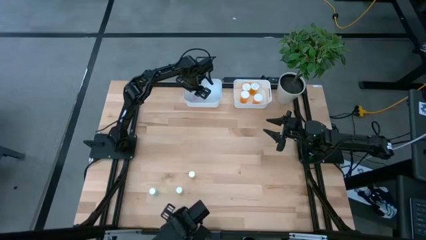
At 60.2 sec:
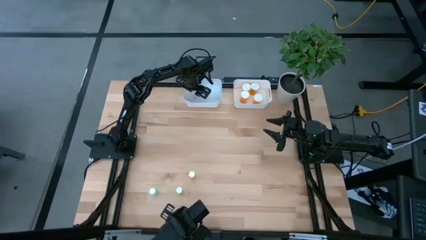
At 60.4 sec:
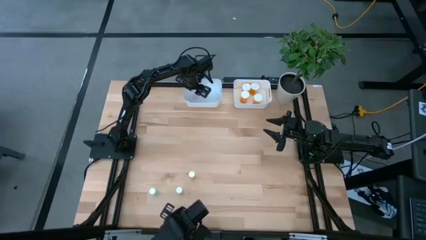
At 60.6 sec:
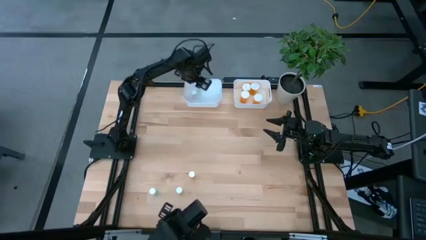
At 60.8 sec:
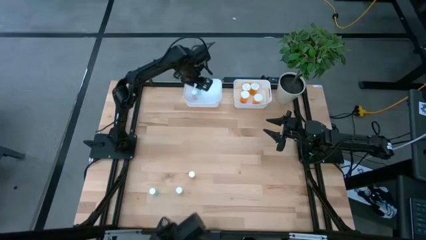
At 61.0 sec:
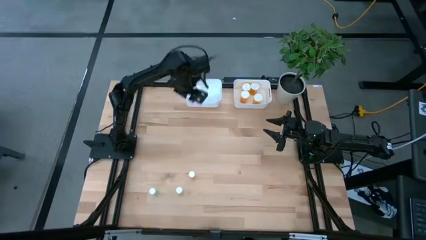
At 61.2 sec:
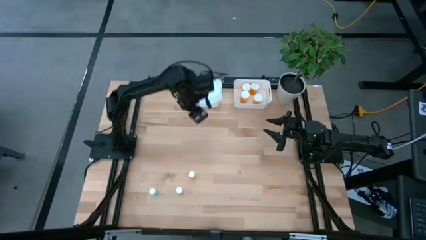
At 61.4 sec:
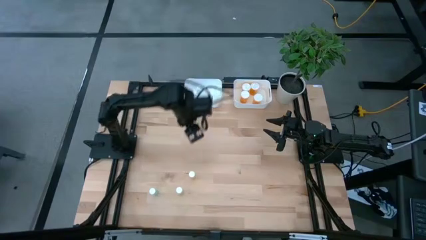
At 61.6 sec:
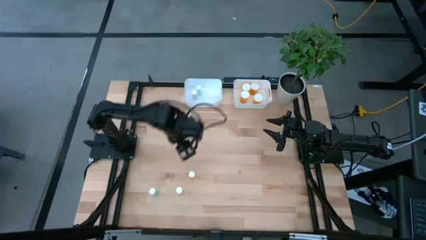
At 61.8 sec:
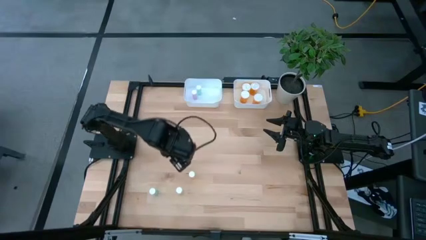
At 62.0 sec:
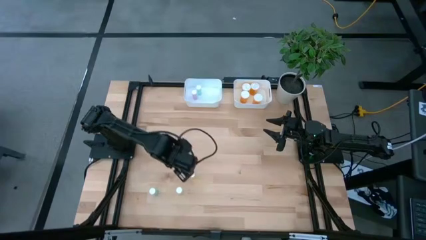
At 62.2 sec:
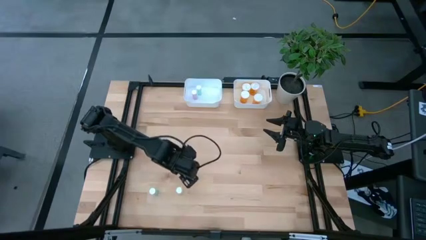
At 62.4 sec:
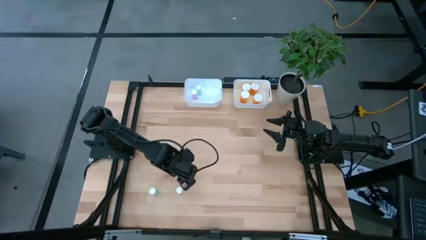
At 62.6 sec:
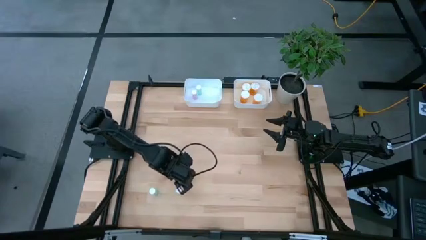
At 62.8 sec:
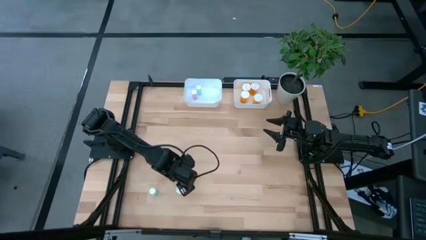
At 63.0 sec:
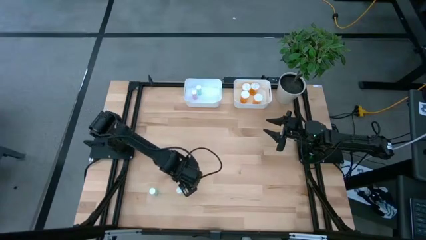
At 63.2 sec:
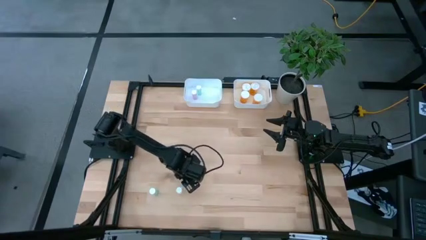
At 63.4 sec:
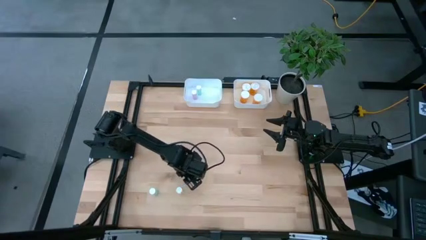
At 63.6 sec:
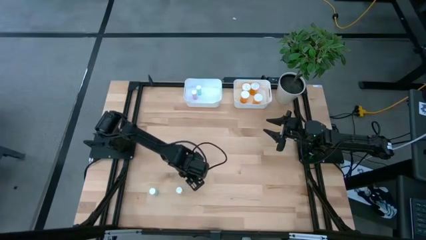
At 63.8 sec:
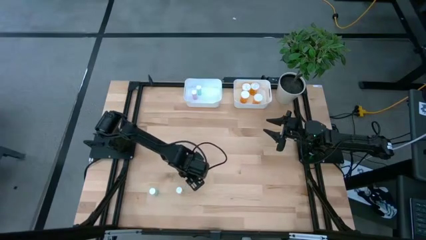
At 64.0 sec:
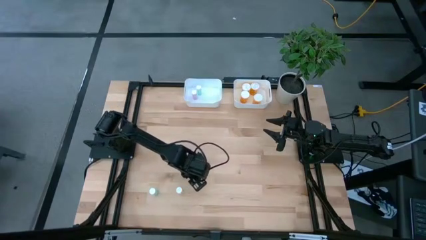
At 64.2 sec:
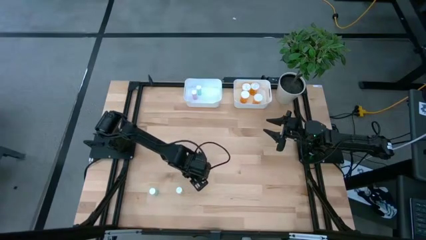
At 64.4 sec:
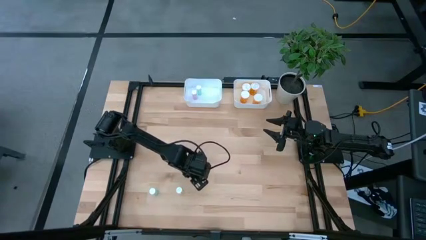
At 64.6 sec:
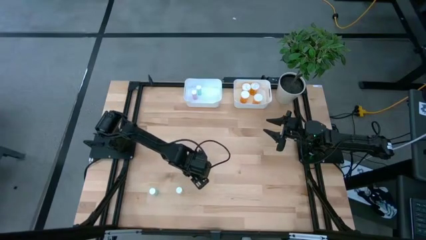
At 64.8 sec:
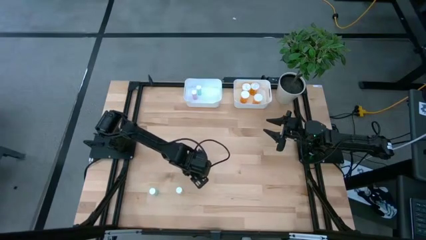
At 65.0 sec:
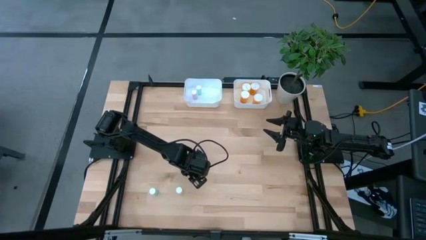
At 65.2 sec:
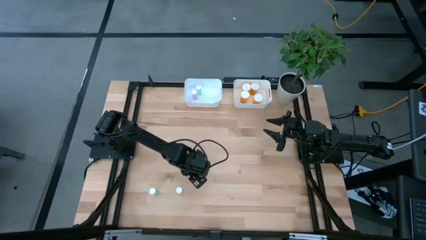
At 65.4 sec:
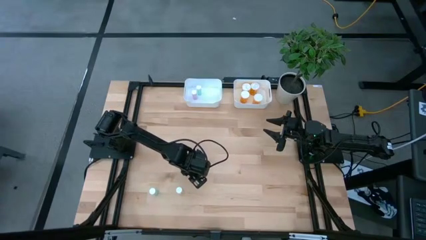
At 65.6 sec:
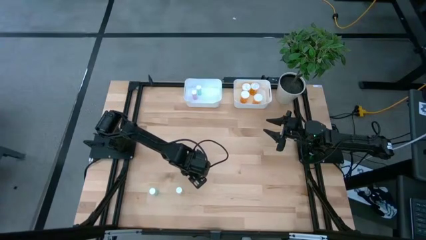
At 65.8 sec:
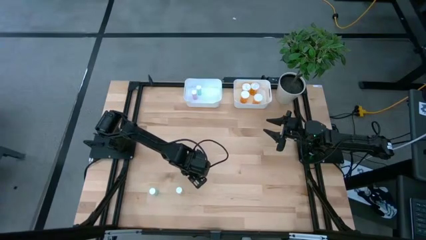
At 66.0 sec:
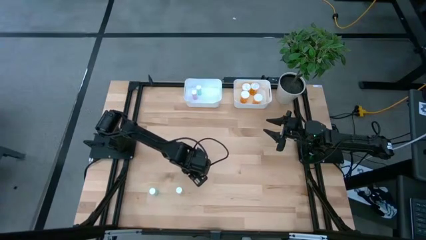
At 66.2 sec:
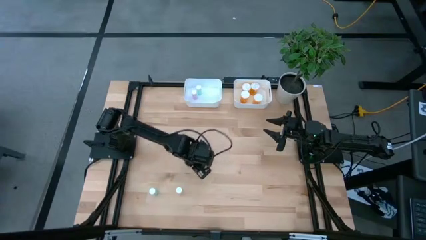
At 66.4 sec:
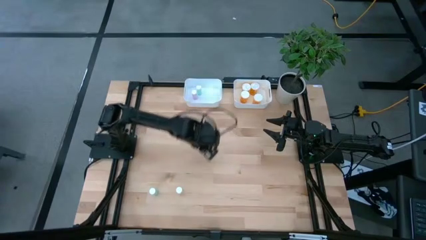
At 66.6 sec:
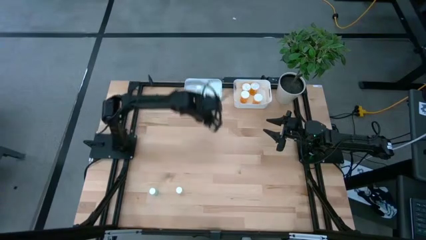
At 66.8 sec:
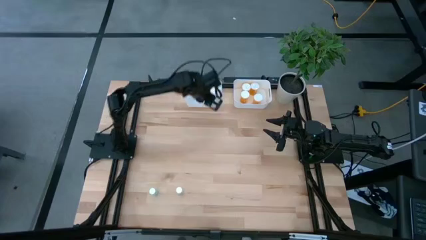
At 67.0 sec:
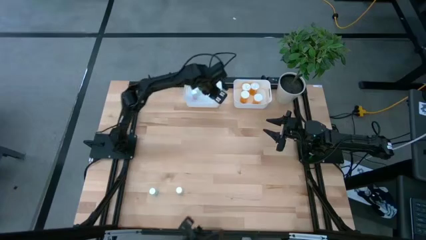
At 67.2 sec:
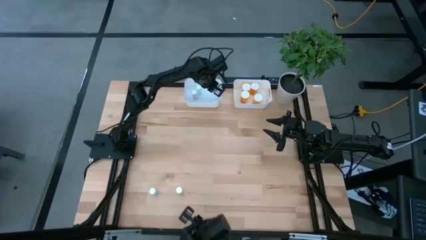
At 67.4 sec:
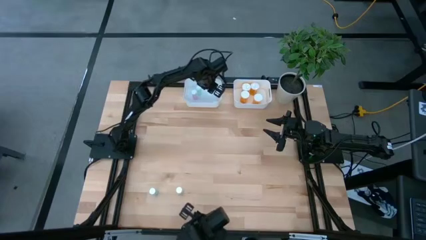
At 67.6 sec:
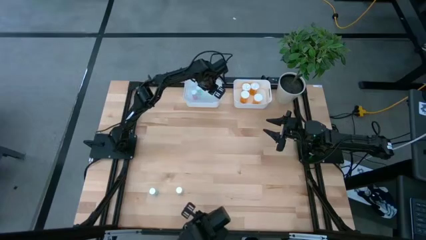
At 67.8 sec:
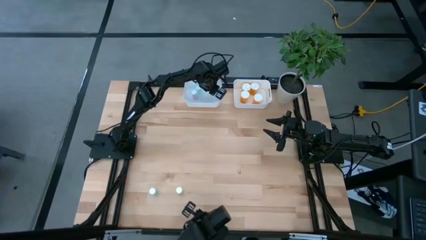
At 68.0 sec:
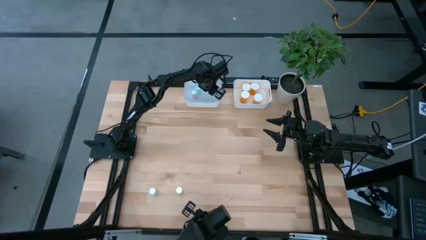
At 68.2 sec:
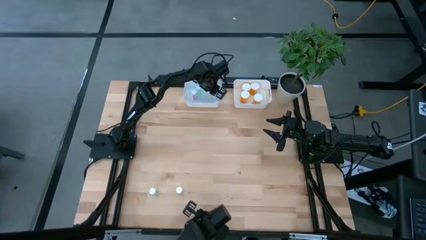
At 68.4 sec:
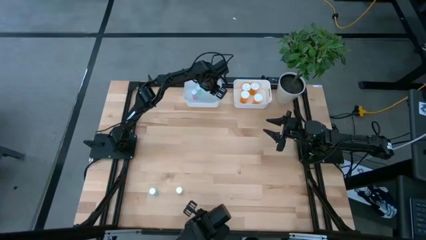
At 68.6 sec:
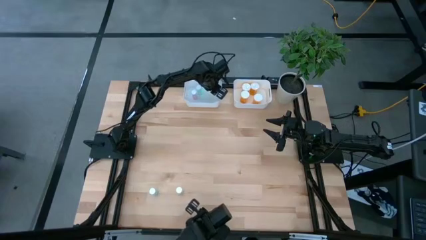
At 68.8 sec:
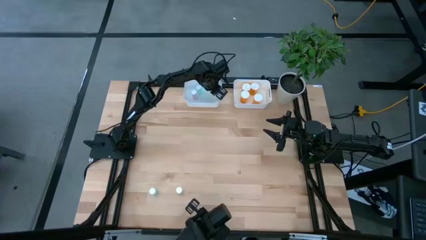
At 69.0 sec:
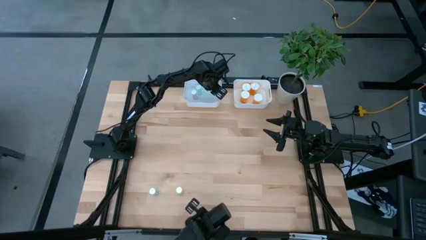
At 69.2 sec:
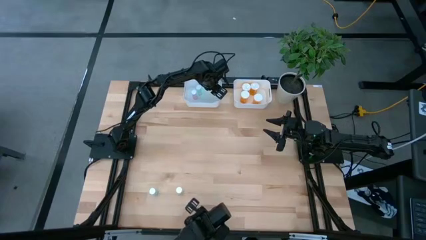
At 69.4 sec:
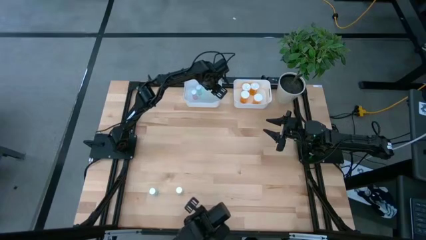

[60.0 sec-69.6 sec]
Task: Pick and place medicine bottles into bin by pill shape (circle, oval)
Put the yellow tablet bottle into the left white bin

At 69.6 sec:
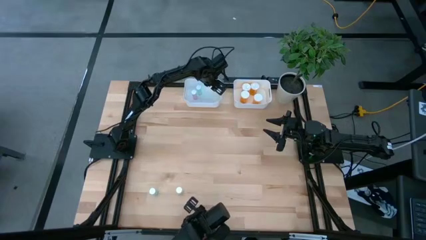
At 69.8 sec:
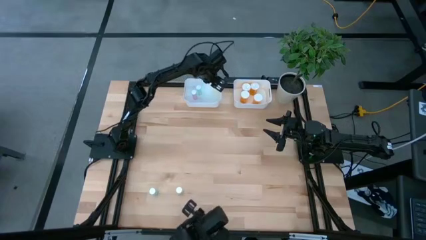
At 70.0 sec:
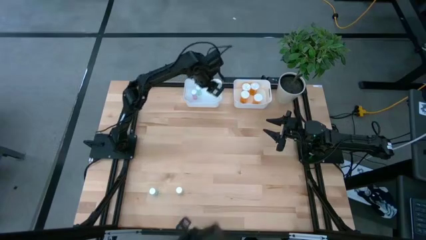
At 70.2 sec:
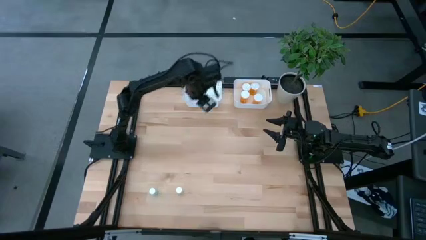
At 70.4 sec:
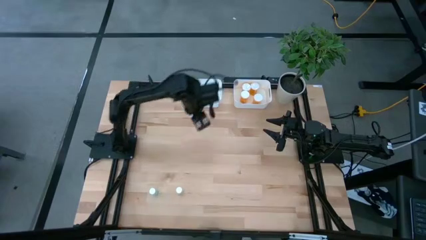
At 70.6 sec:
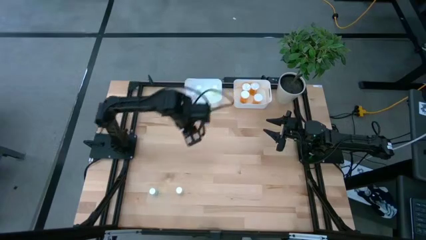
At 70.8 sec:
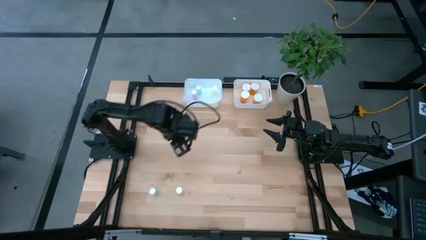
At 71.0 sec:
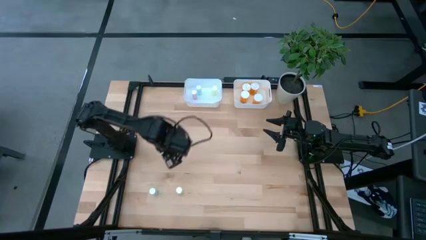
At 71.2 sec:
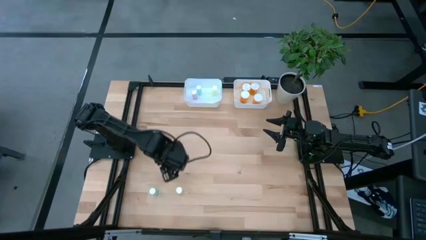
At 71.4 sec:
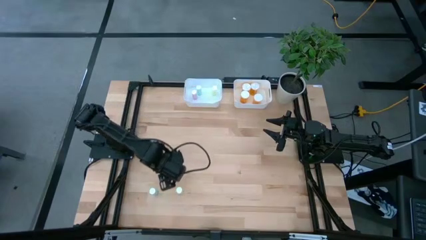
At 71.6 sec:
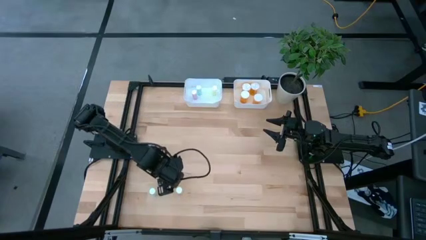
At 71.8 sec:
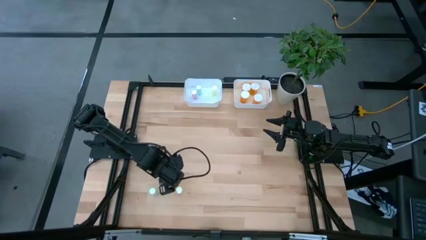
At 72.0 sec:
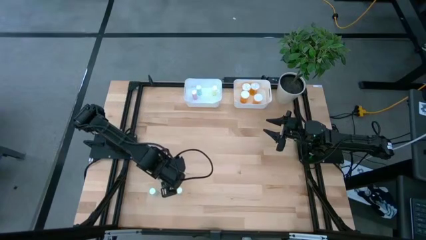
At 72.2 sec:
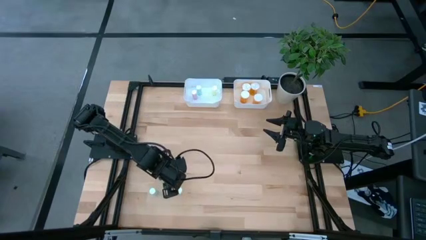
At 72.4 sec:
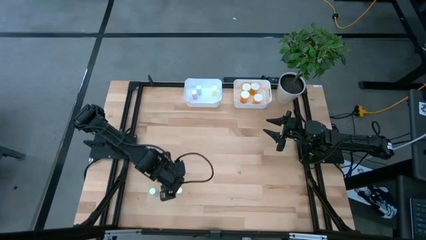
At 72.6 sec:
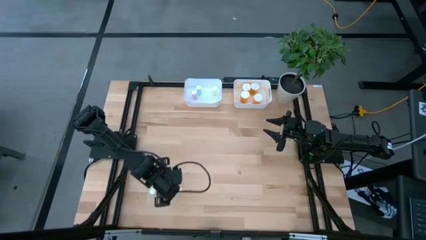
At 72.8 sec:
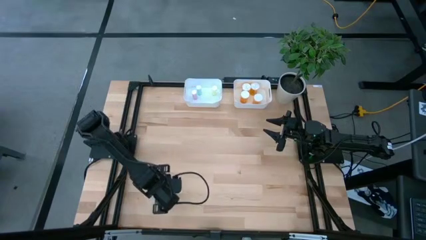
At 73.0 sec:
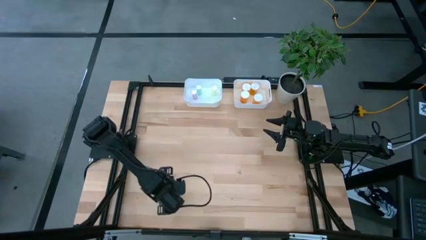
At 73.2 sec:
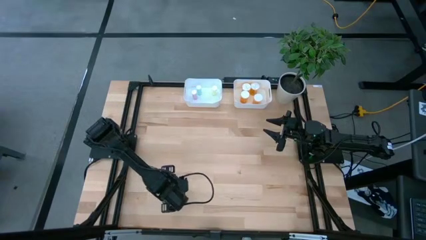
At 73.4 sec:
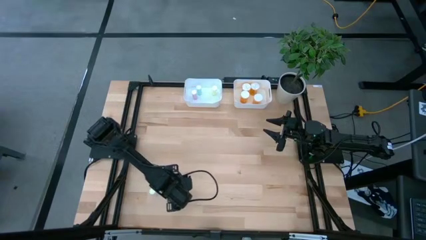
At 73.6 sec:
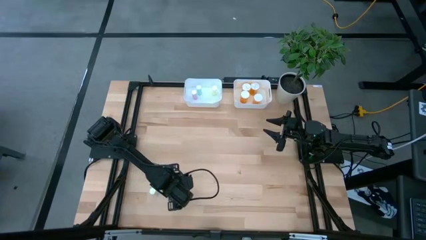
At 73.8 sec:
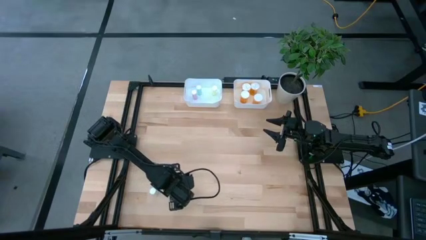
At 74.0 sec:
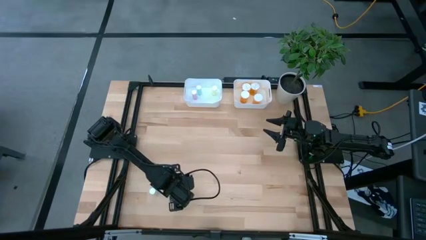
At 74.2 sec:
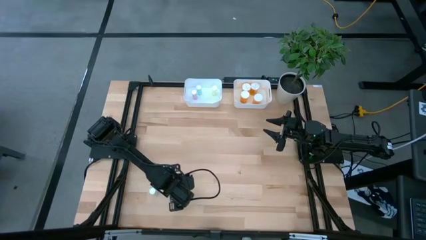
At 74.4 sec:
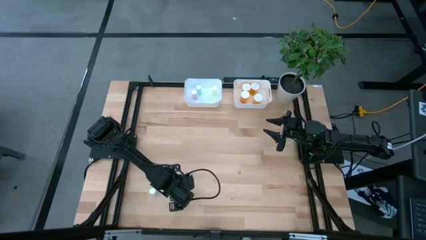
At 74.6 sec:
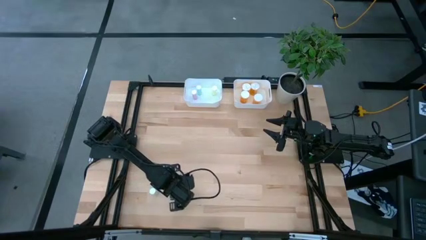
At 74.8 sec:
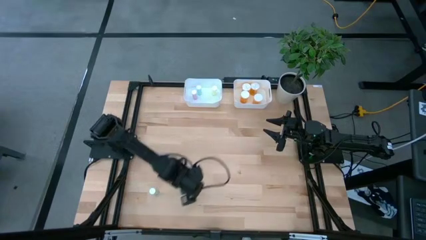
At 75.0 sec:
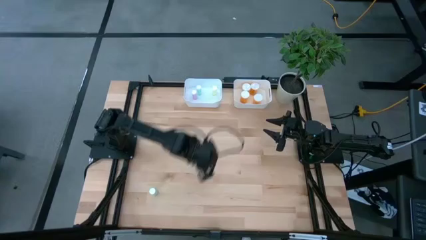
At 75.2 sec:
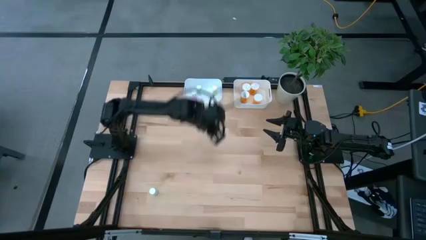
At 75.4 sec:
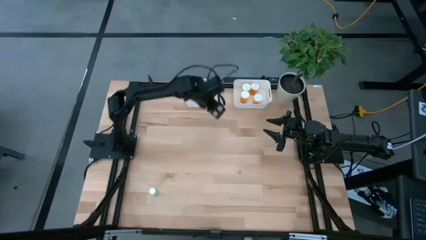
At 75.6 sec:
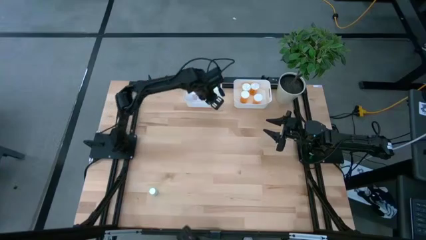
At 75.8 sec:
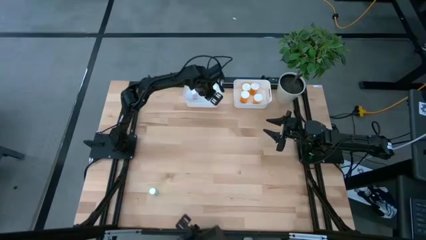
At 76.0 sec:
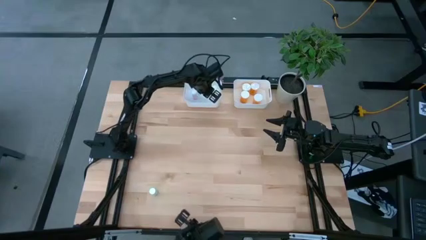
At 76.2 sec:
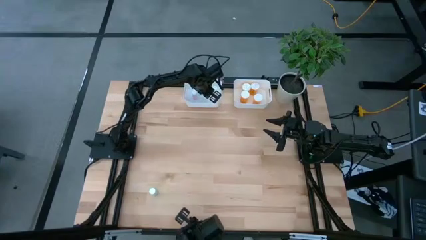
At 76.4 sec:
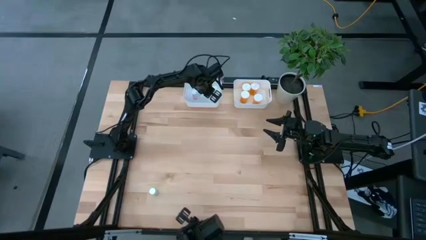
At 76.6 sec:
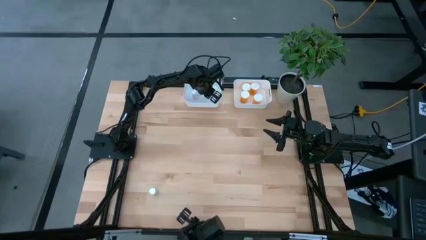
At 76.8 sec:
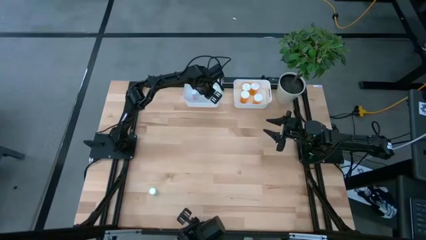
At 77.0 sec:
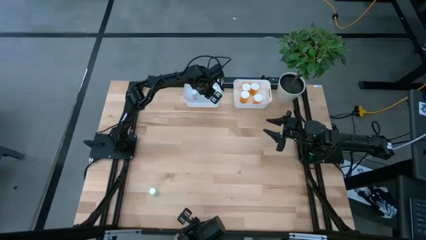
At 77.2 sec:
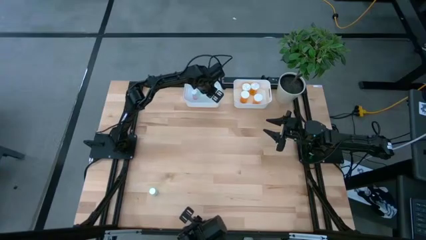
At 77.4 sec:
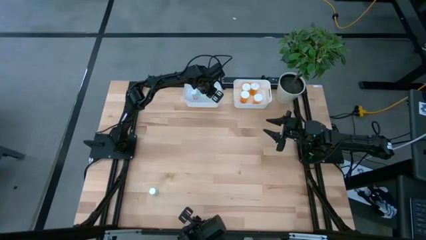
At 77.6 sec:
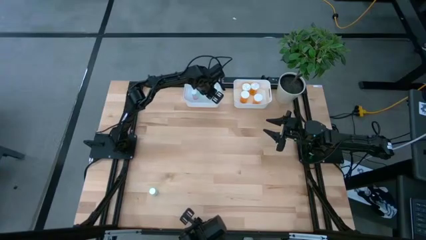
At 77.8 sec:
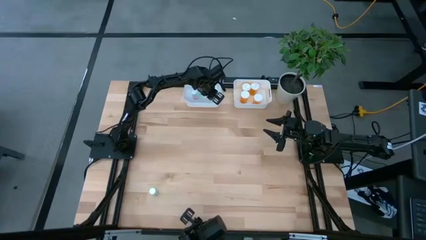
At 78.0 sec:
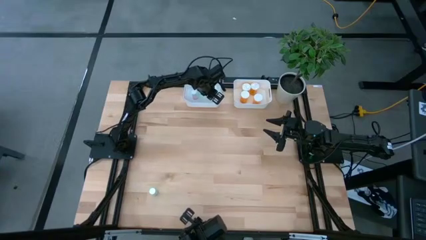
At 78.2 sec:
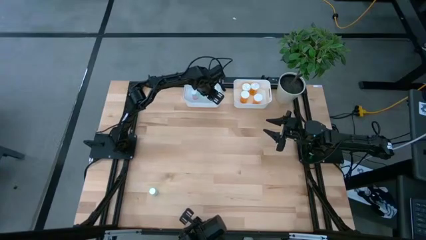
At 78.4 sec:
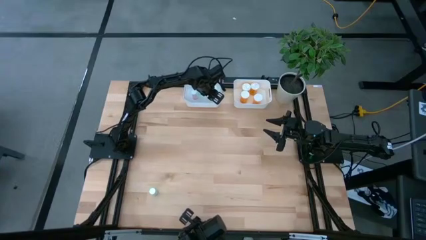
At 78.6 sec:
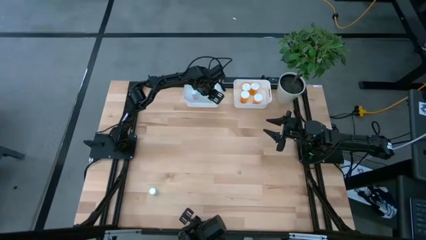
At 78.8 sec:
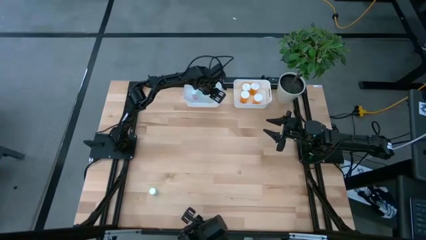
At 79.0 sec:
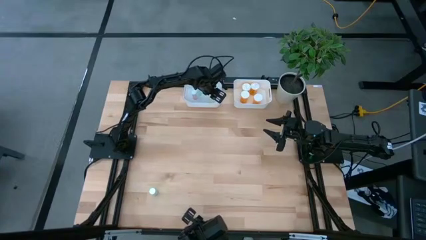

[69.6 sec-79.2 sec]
Put the yellow tablet bottle into the left white bin
